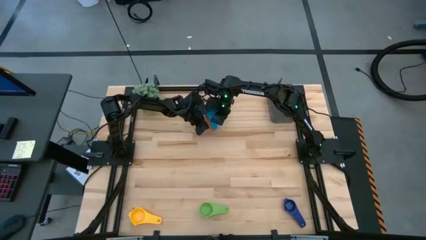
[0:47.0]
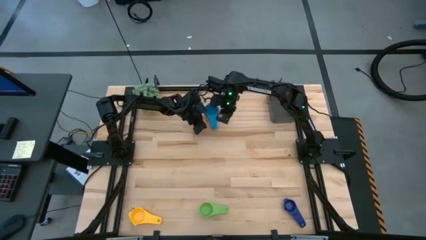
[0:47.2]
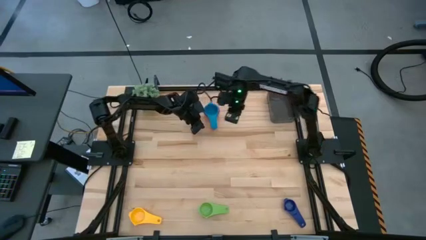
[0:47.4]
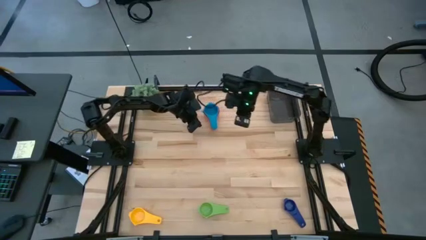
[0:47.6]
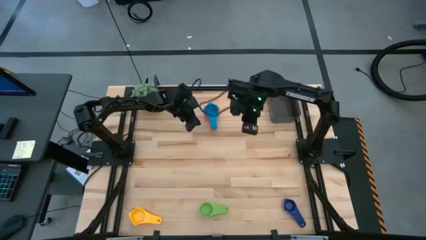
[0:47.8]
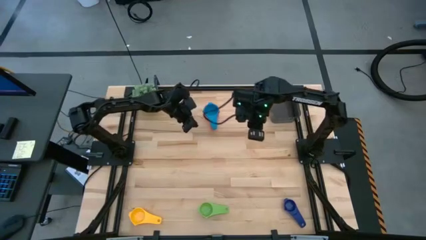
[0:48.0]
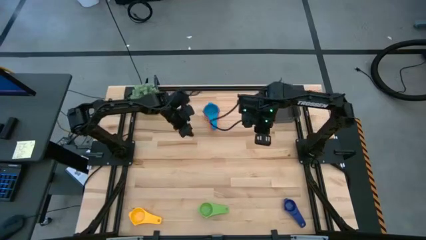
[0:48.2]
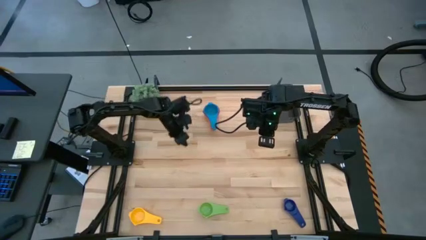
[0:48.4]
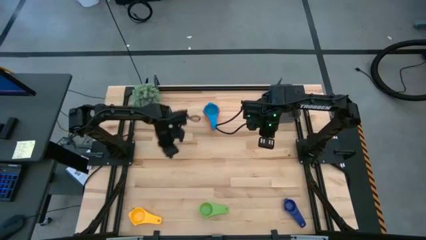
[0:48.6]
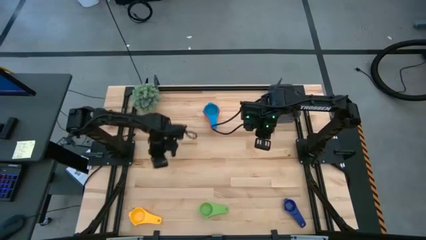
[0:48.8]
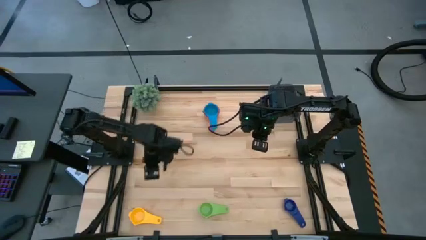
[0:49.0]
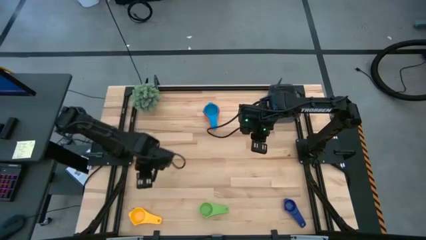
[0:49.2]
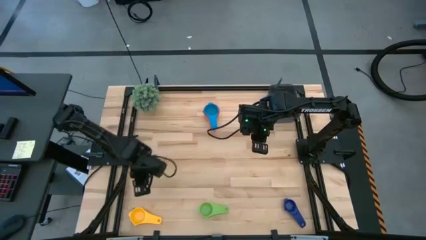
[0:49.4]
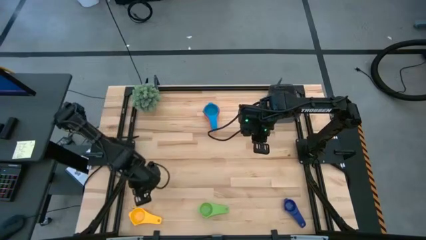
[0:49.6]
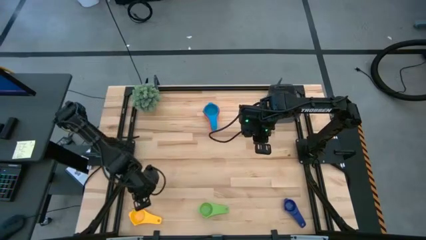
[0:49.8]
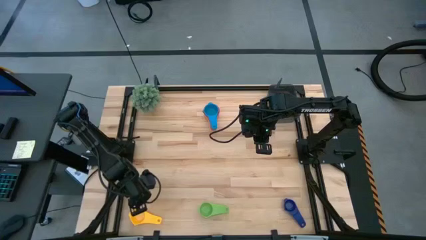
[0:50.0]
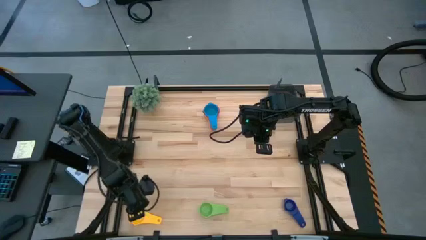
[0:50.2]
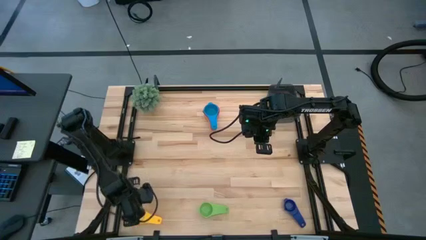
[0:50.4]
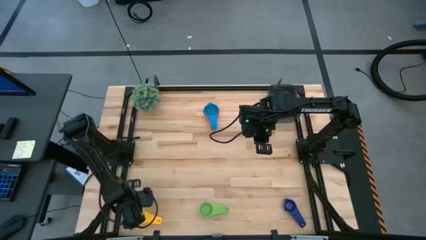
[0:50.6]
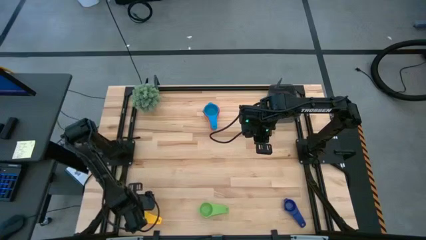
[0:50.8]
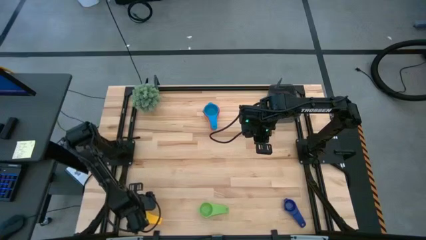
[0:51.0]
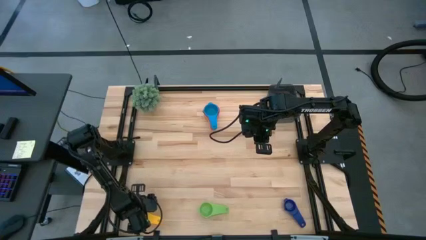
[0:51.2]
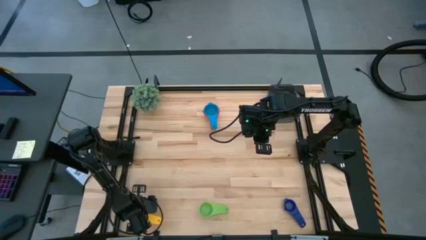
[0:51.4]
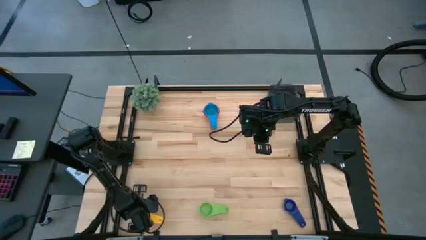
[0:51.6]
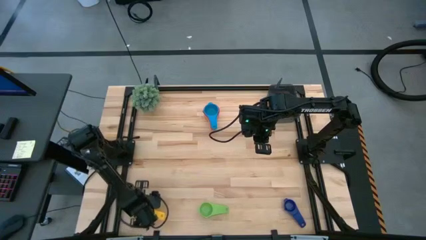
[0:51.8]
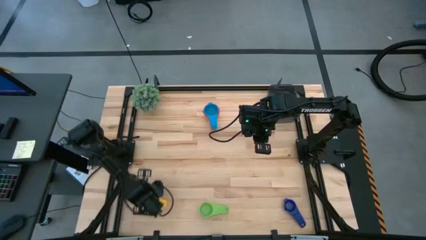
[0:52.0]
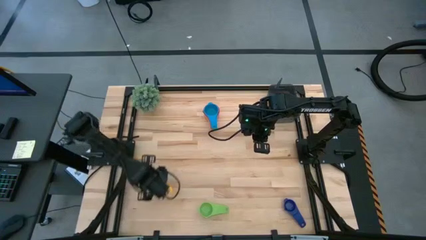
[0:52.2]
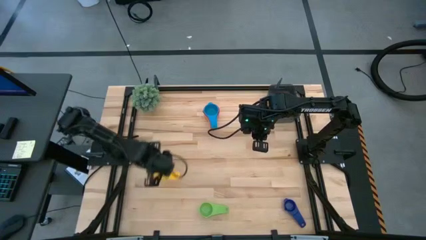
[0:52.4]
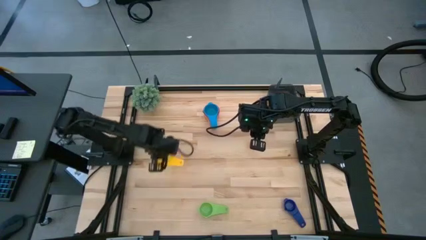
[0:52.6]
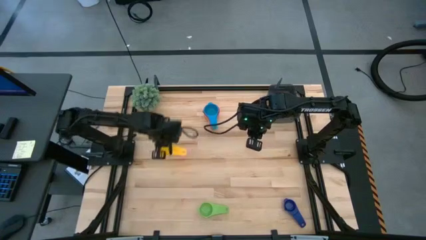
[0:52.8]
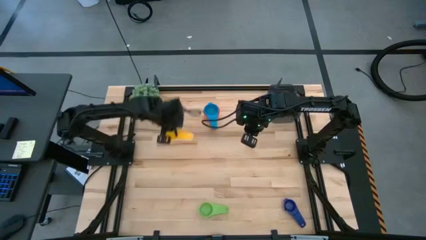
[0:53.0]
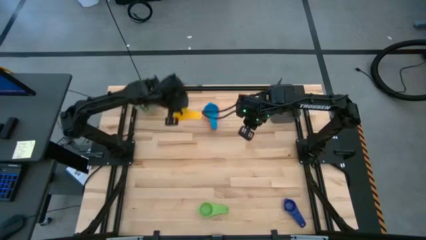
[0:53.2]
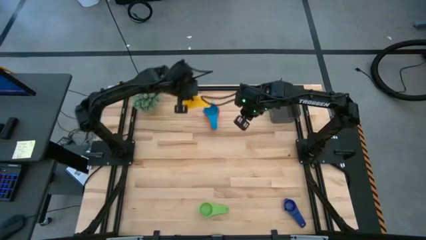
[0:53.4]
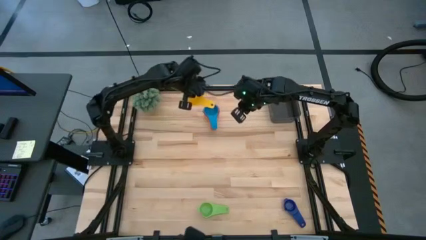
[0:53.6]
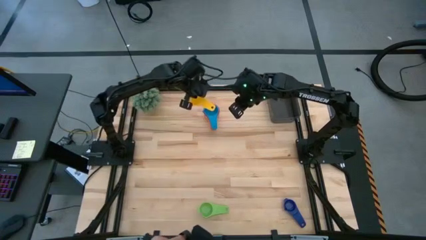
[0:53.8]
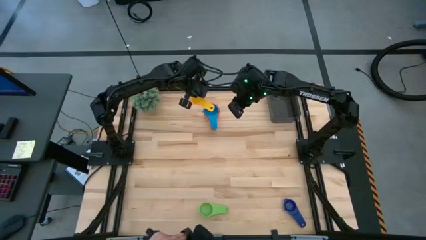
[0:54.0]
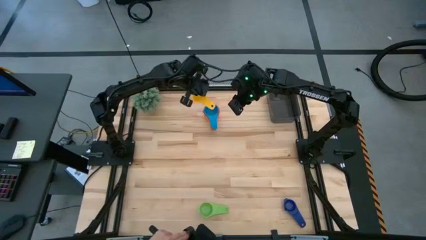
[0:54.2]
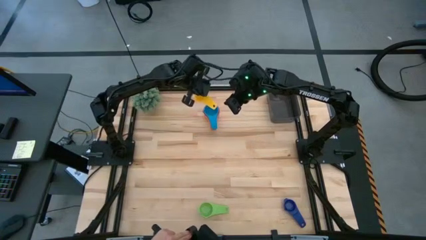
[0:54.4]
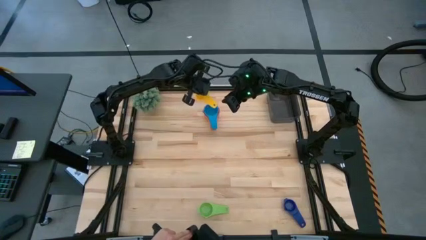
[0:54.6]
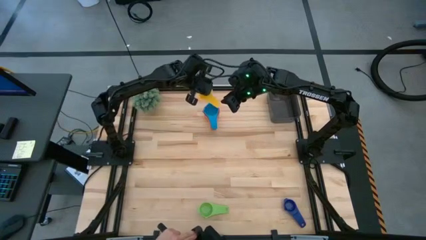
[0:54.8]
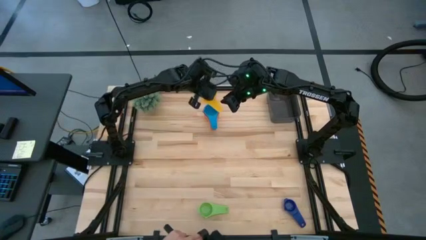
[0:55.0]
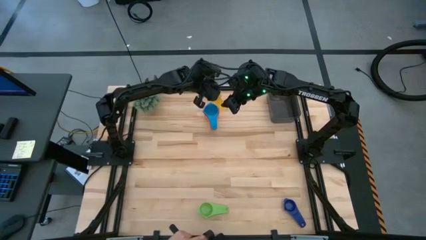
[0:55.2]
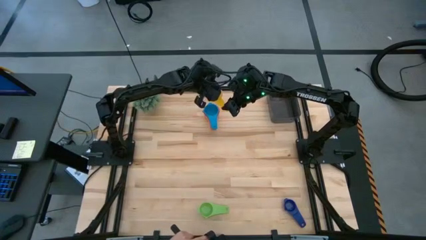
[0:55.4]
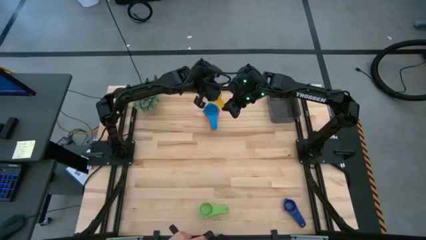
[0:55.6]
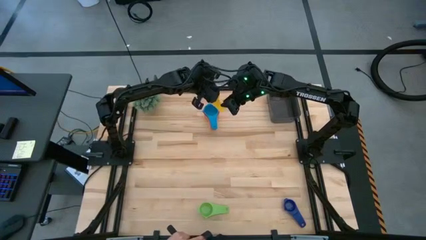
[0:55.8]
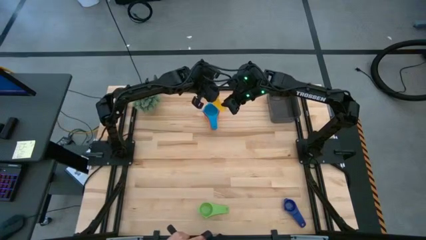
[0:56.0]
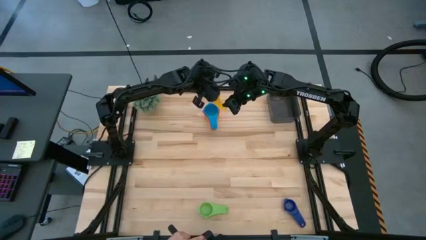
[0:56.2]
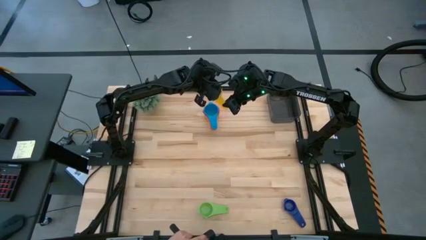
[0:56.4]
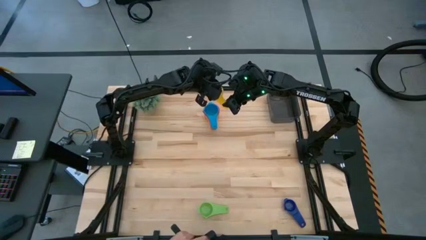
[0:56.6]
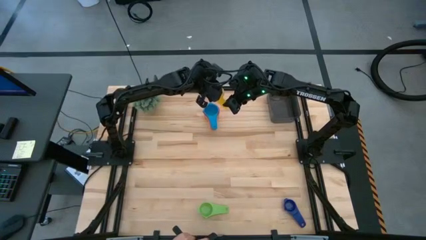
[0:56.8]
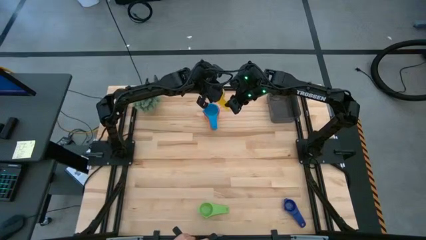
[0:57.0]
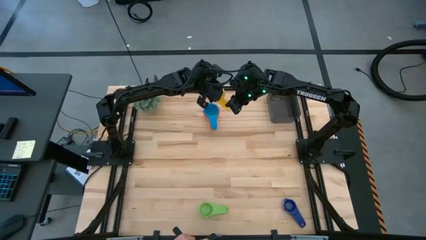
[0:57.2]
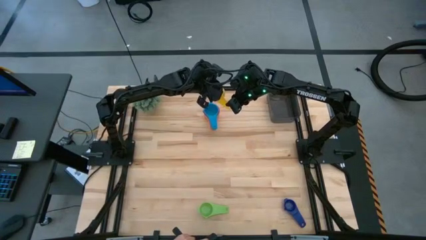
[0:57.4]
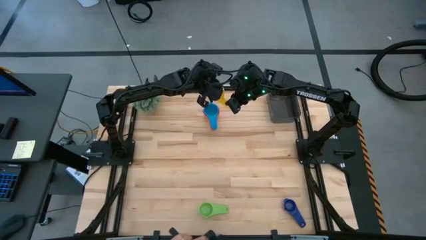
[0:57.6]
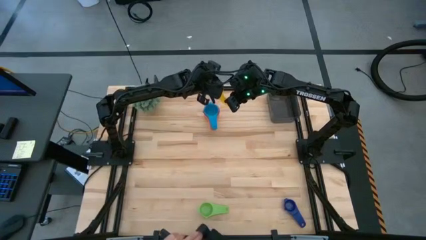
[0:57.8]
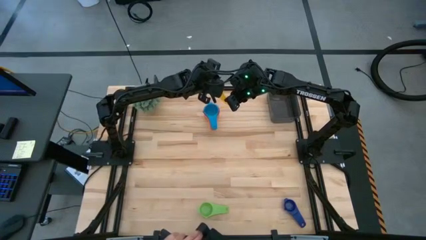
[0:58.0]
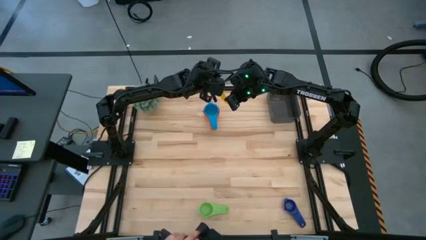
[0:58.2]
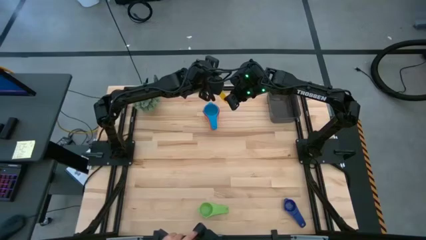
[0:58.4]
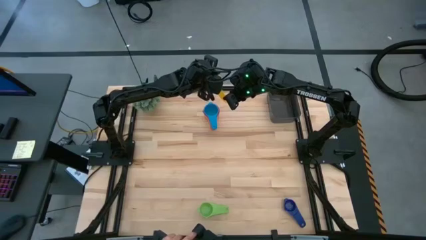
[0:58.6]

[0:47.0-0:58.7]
Task: Nest measuring cups in basket
Stack the yellow measuring cup on top of the light blue measuring cup

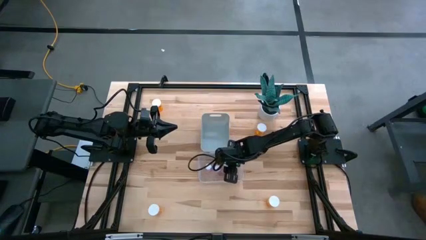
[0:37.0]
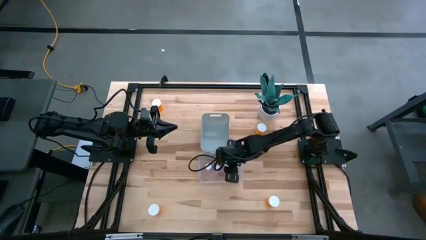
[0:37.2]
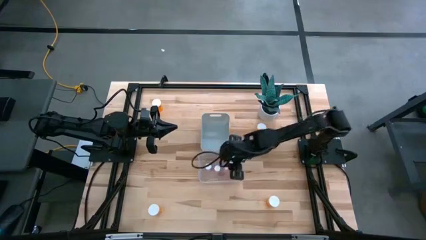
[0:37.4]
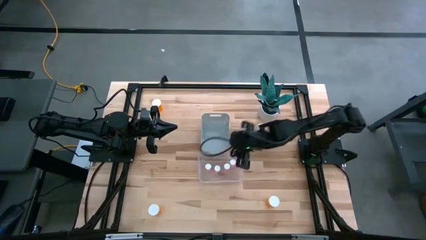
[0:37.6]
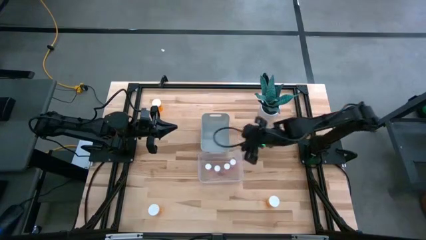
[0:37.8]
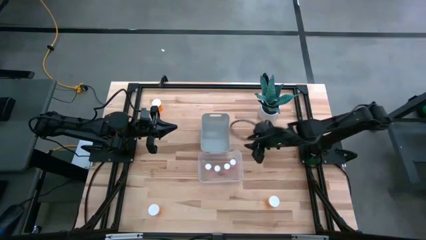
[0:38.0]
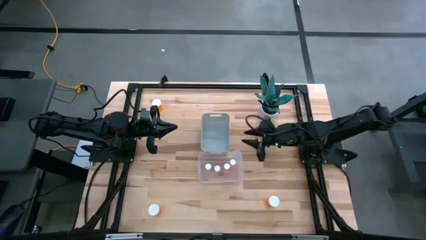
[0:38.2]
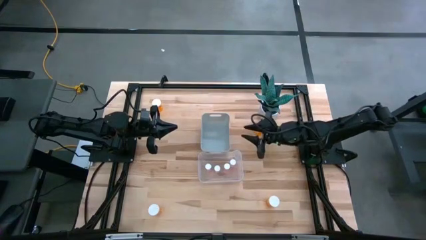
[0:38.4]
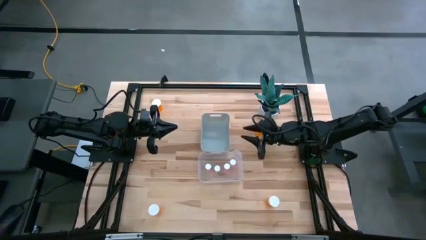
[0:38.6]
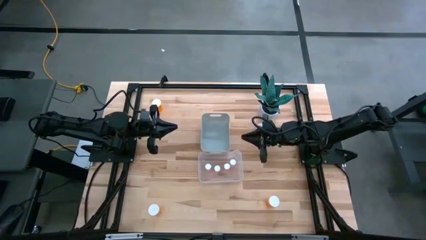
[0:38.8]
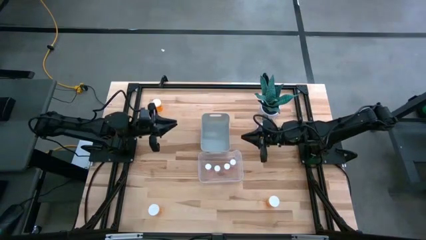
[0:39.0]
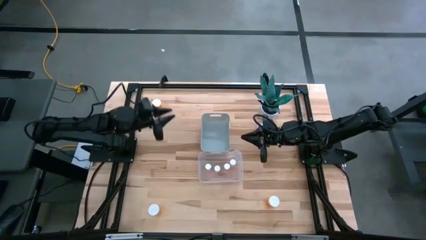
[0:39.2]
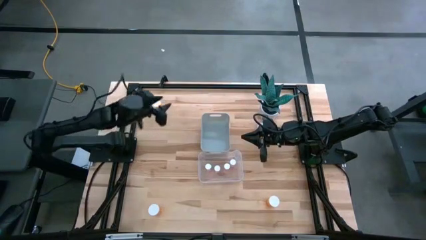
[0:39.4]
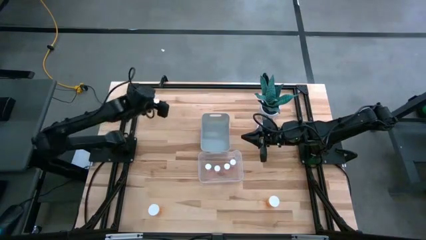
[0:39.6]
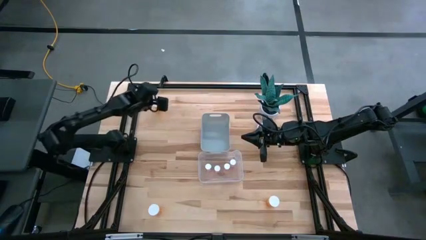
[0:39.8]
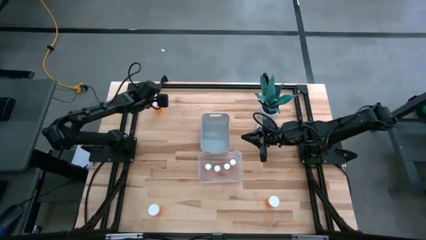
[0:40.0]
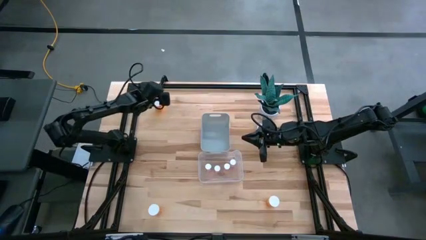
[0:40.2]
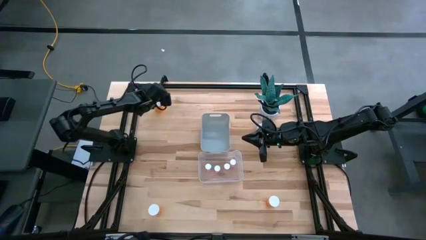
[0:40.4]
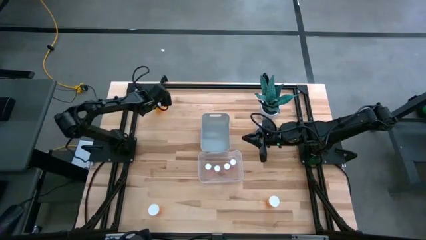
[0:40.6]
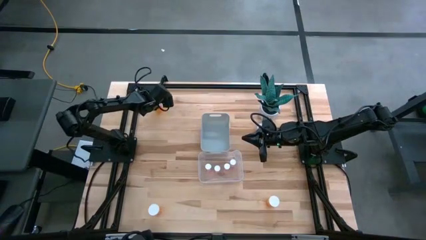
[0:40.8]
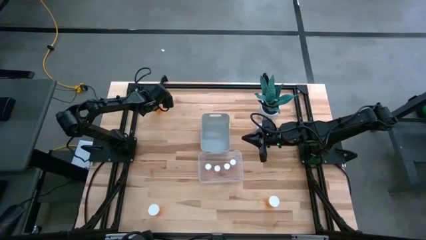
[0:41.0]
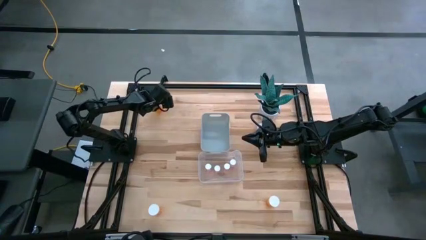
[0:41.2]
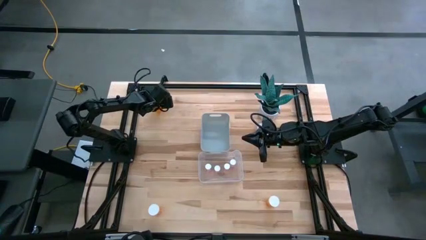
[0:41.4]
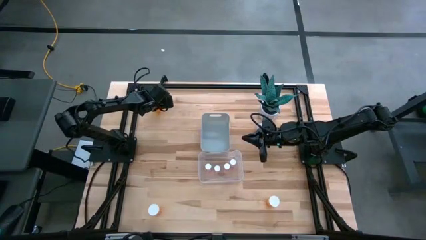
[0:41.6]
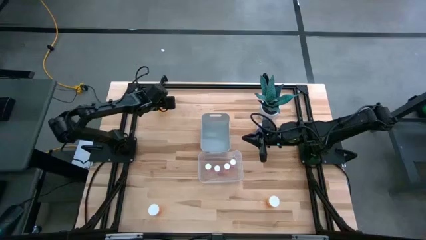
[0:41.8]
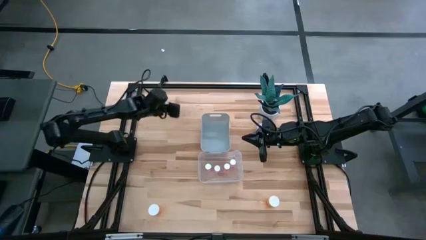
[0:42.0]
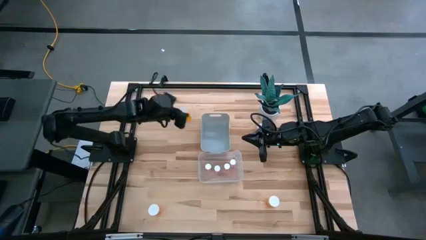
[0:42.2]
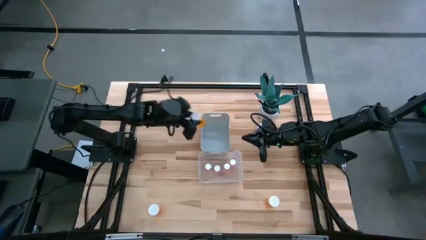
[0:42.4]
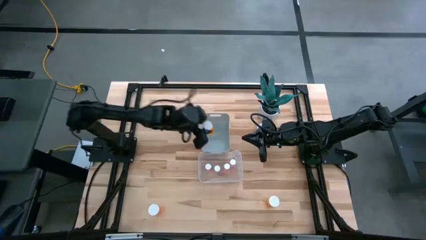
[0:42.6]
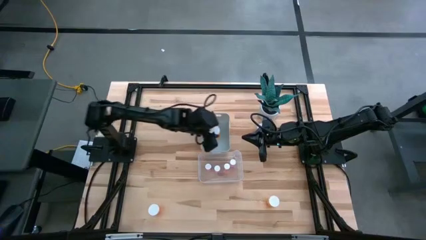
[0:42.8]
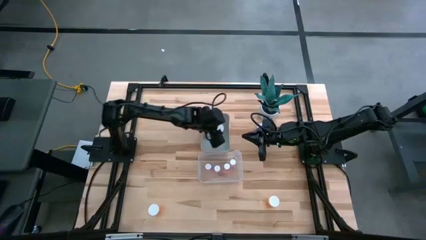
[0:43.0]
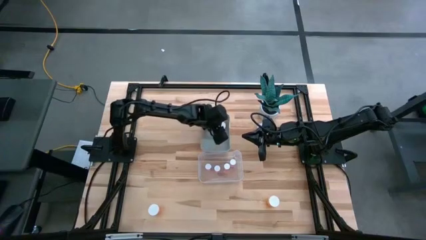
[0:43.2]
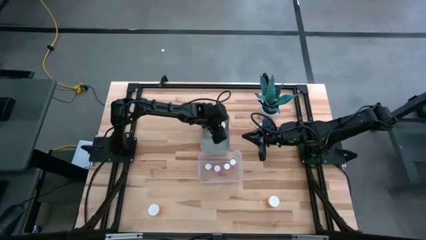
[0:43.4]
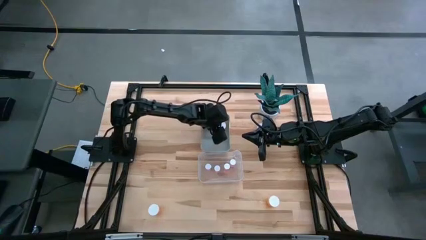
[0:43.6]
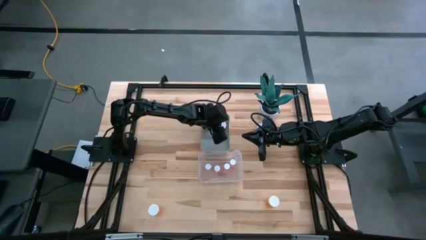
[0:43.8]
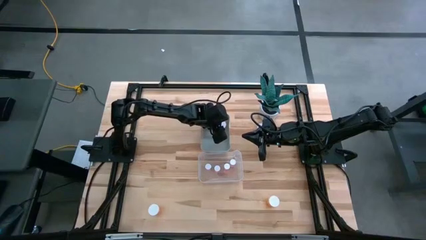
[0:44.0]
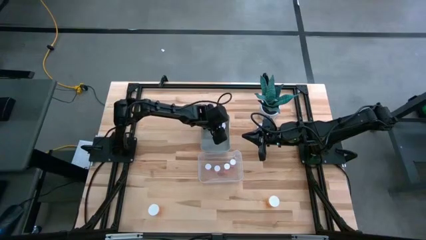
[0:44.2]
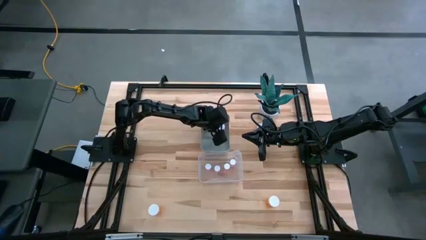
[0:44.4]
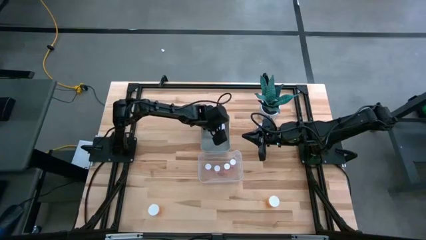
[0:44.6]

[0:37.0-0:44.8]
Task: Pick and place medicine bottles into bin by pill shape (circle, oval)
Put the top left orange pill bottle into the gray bin
